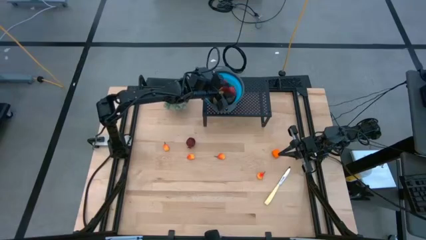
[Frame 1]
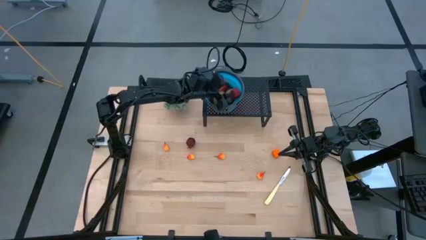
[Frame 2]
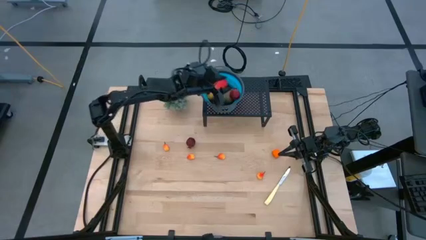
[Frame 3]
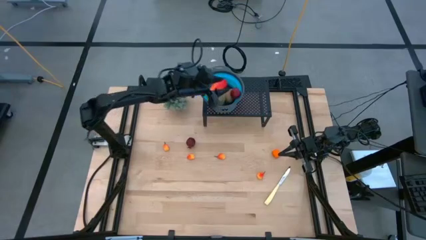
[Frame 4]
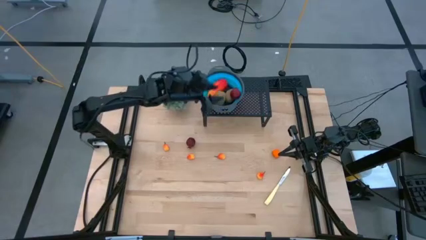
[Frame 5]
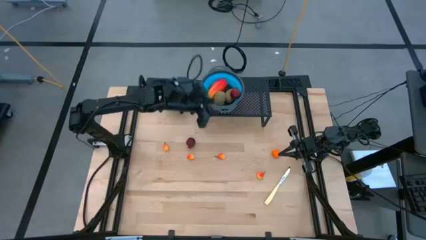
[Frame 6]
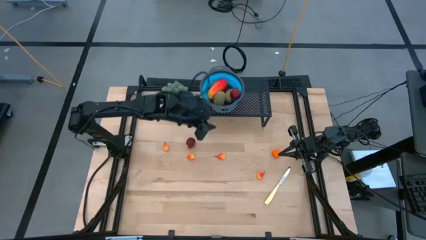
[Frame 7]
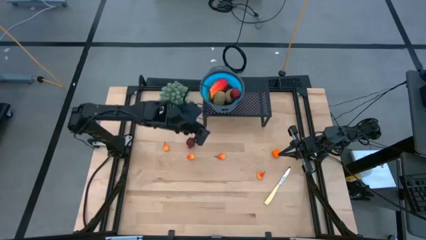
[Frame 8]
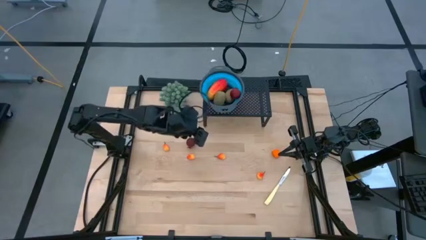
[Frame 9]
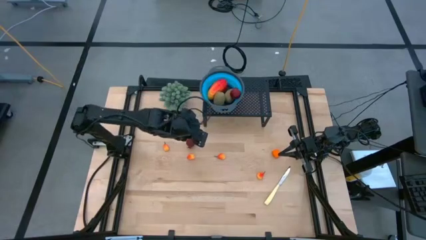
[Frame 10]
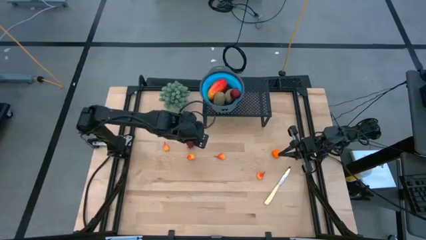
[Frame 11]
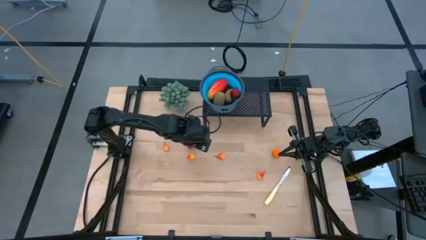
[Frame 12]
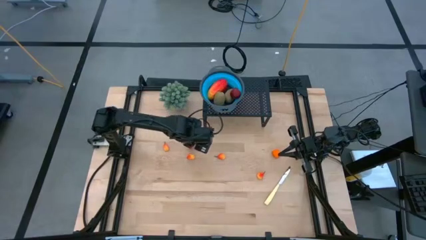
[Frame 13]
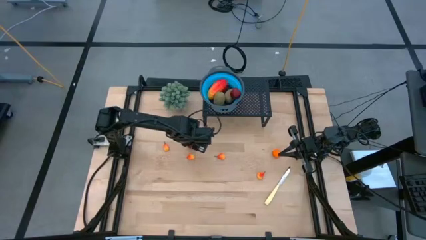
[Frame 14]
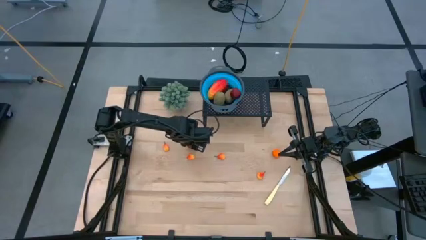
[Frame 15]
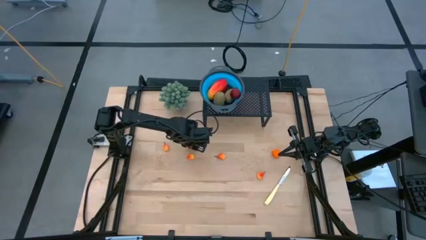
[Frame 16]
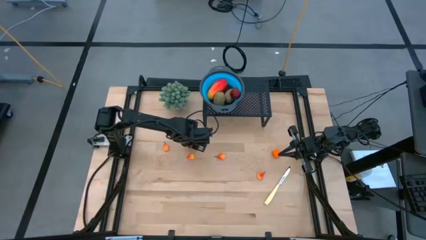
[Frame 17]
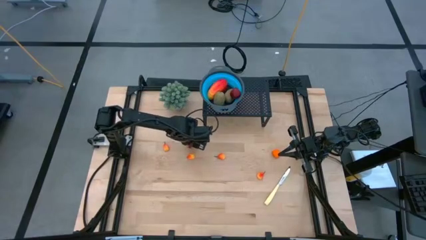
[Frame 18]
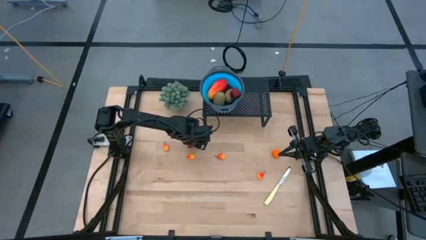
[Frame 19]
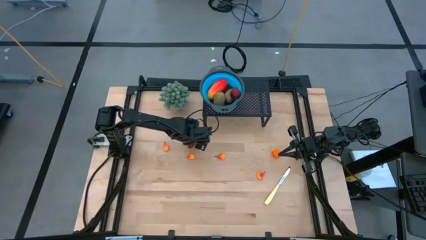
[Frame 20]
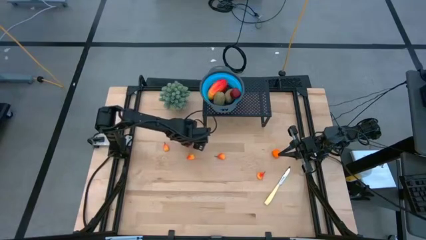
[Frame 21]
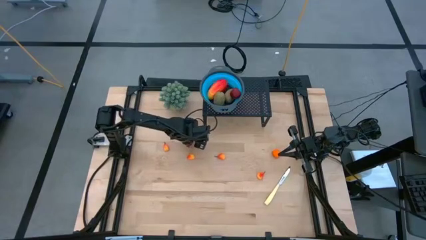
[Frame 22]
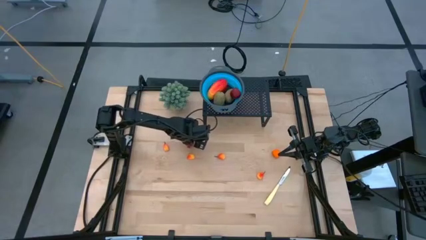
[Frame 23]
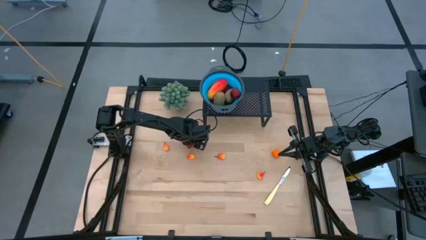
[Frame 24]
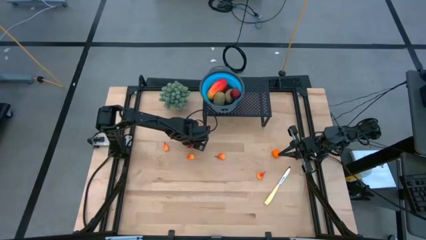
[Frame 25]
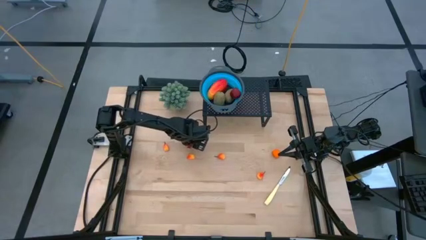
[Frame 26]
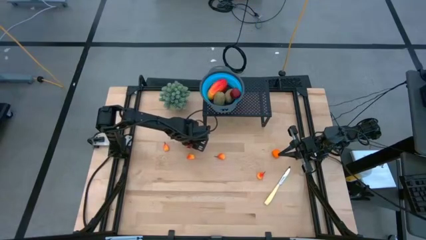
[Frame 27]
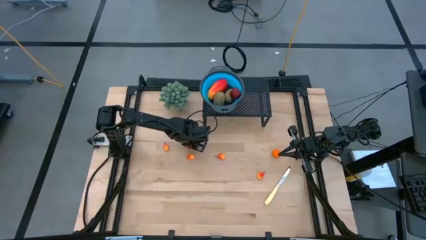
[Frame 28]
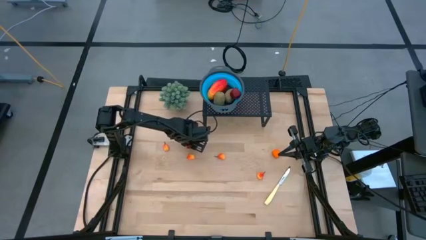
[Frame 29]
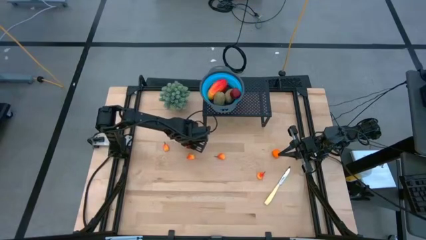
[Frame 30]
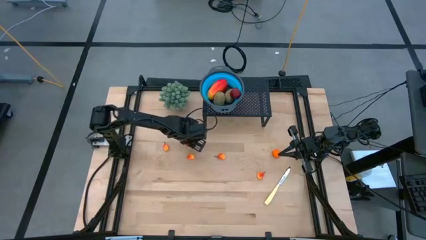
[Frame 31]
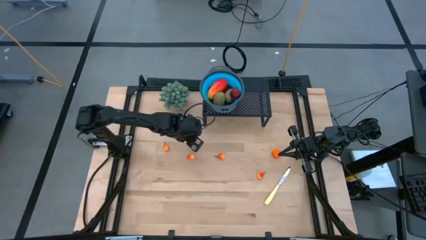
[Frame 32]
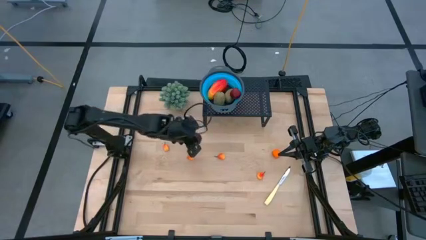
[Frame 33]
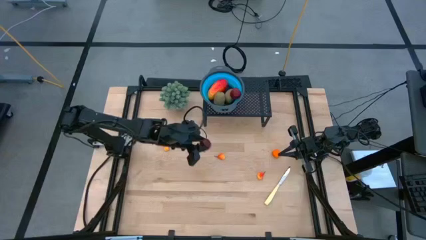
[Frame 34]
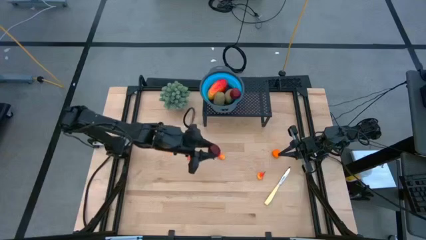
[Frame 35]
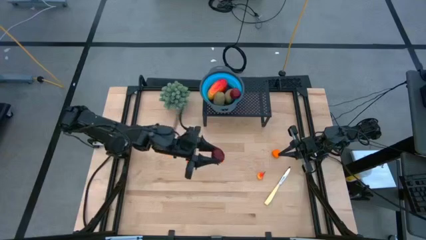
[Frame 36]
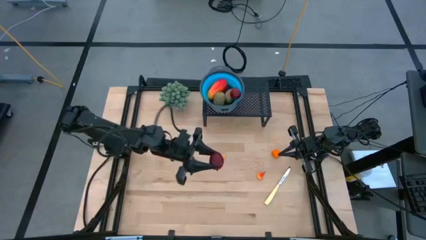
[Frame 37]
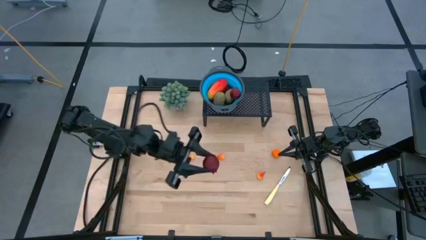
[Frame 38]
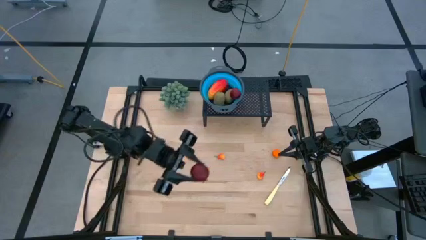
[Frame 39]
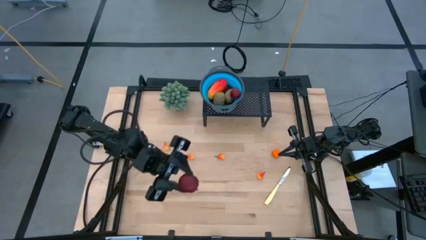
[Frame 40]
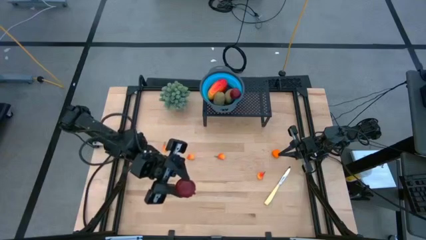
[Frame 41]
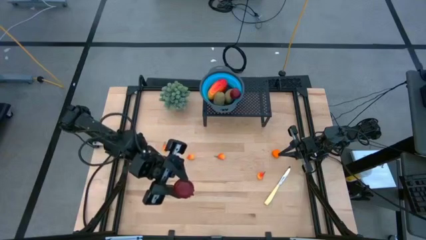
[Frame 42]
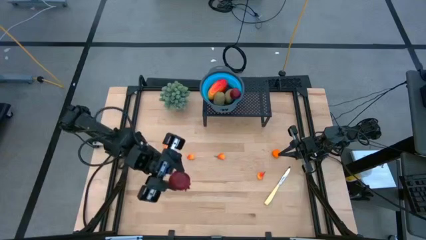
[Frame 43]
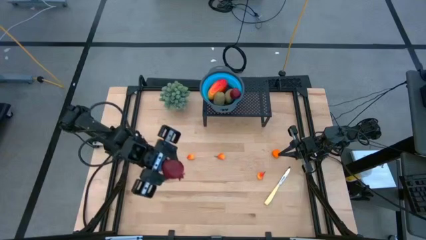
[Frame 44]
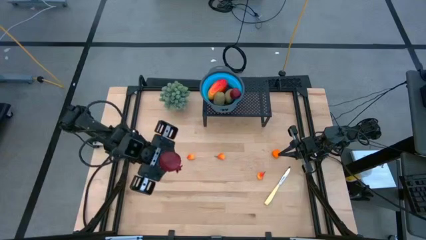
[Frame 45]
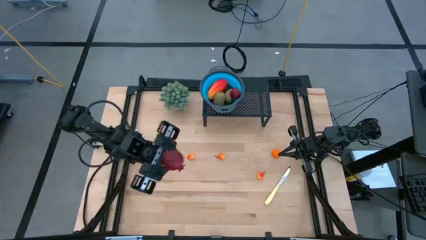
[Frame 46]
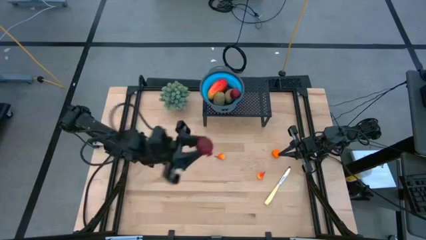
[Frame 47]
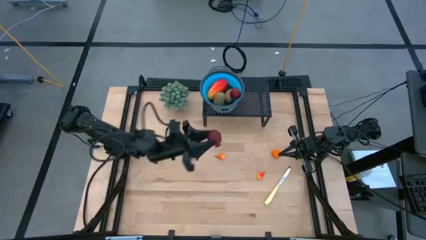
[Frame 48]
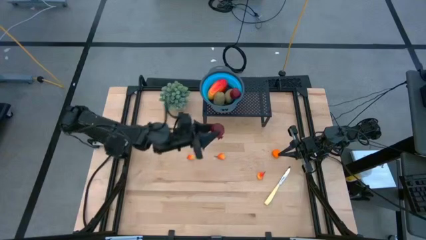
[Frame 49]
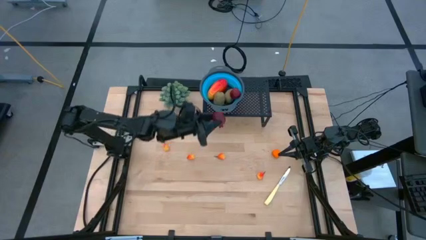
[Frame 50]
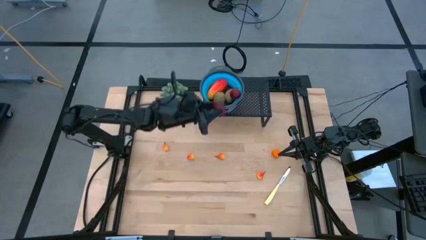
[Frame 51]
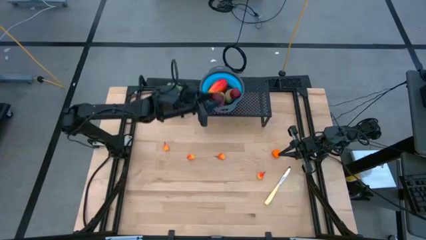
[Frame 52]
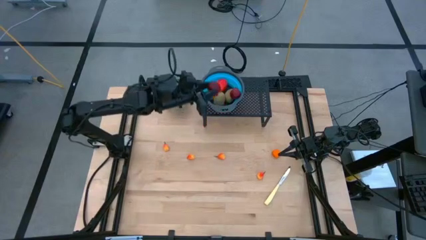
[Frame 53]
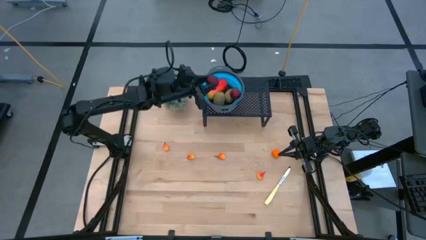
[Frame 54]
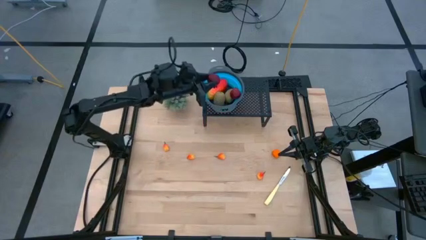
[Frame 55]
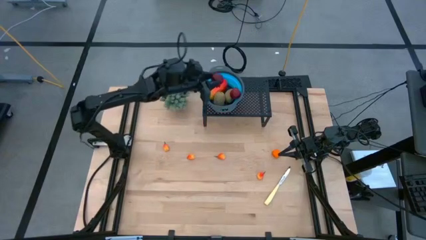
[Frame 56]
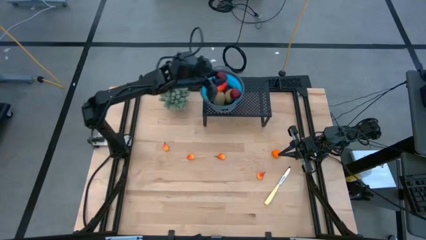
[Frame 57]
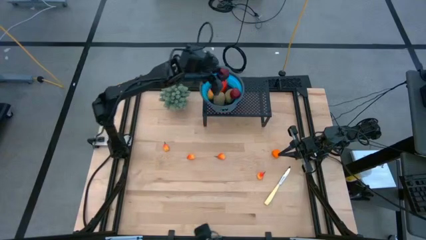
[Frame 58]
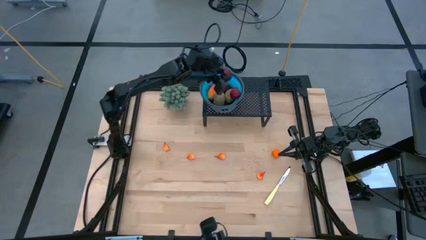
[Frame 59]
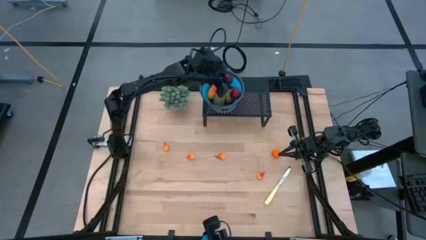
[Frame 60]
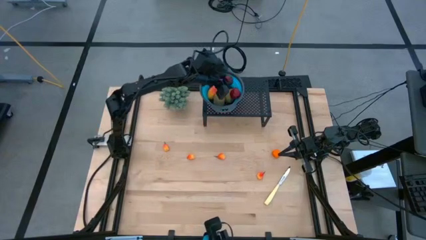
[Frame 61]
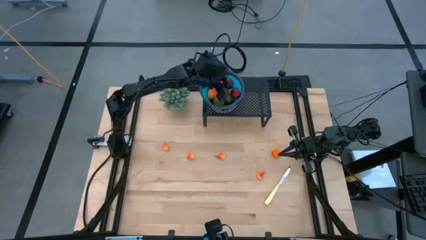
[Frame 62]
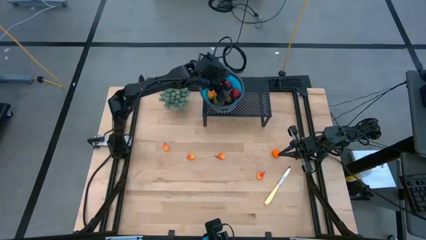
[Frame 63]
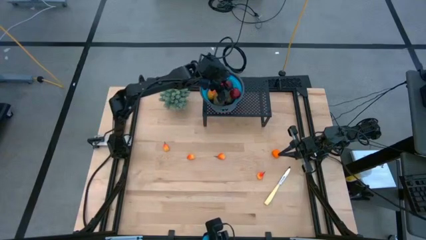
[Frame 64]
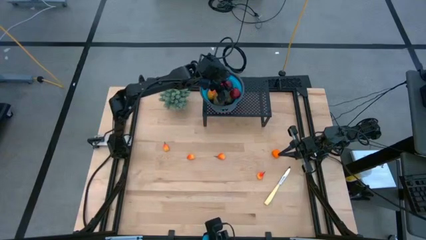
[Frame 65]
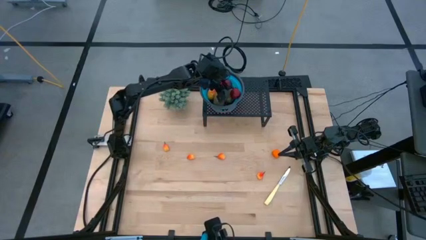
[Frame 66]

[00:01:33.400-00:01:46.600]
Task: Pick & Place Fruit
Put the red pomegranate into the blue strainer bowl on the shelf
